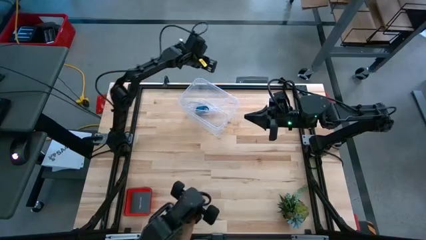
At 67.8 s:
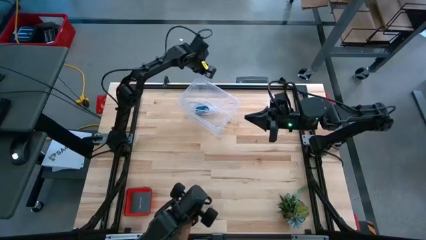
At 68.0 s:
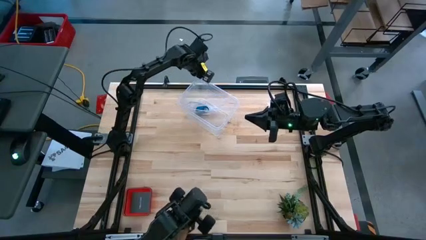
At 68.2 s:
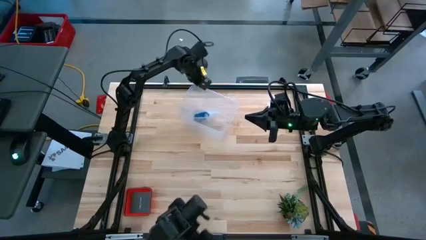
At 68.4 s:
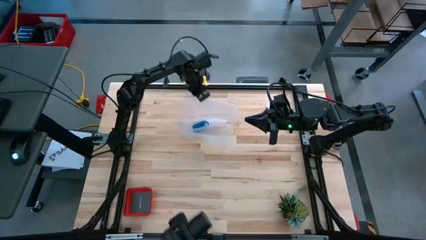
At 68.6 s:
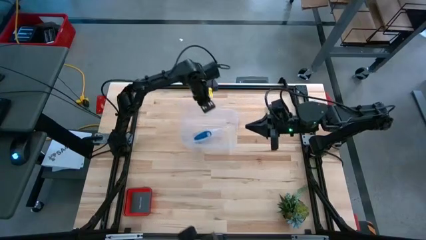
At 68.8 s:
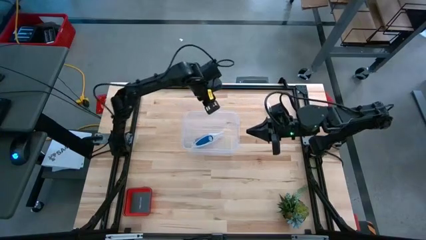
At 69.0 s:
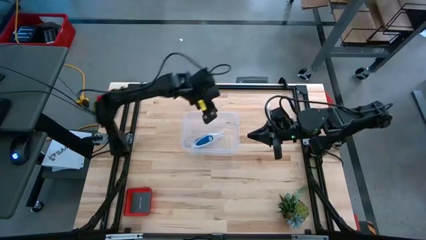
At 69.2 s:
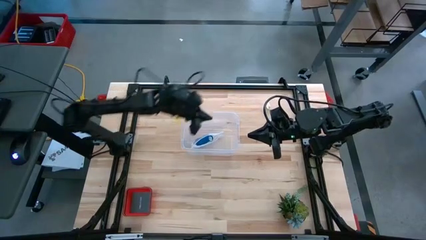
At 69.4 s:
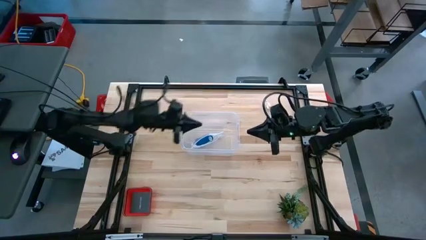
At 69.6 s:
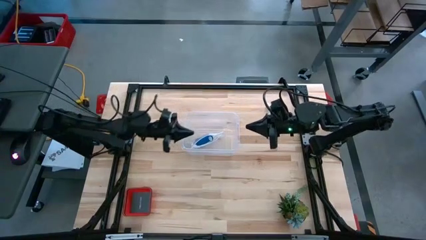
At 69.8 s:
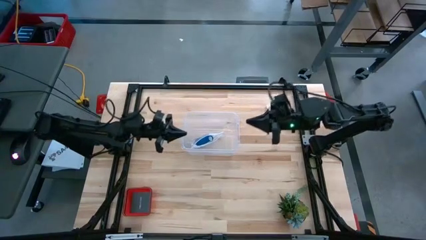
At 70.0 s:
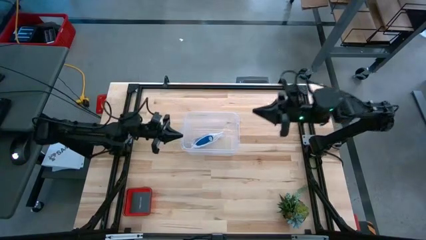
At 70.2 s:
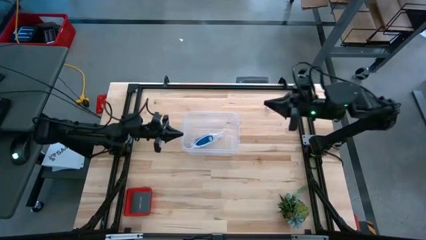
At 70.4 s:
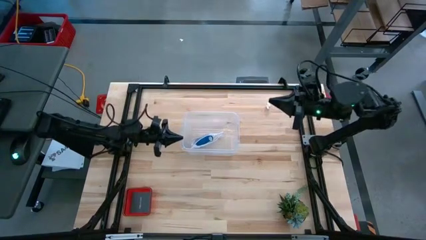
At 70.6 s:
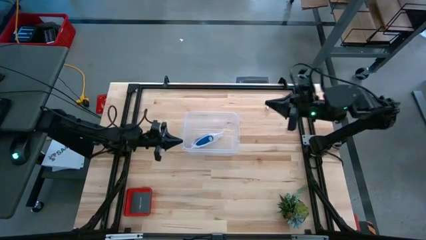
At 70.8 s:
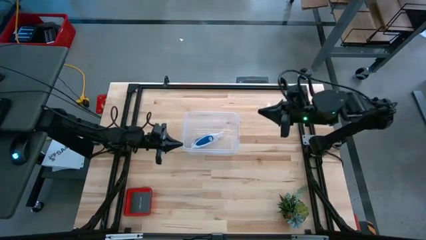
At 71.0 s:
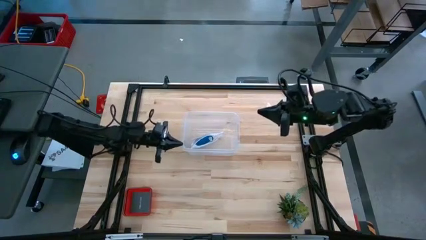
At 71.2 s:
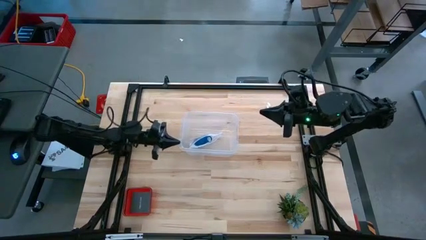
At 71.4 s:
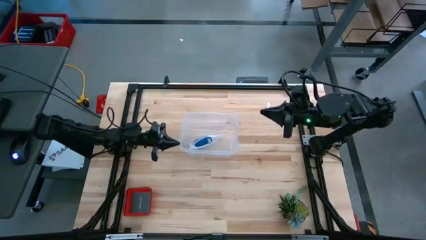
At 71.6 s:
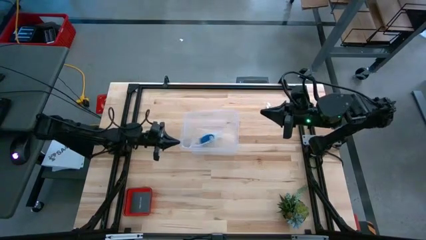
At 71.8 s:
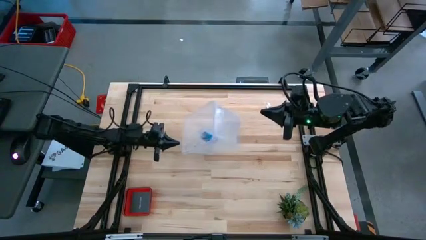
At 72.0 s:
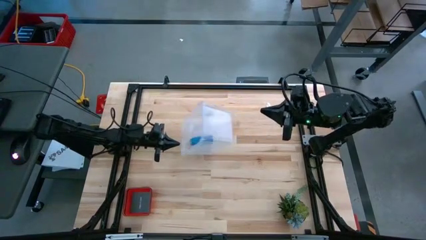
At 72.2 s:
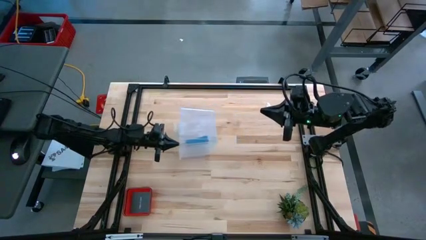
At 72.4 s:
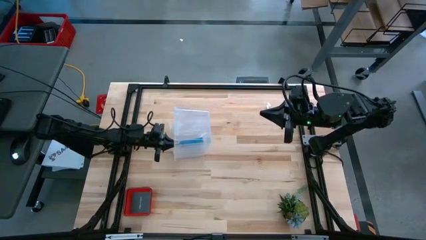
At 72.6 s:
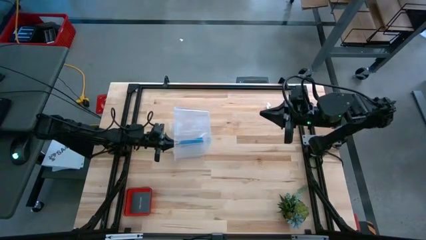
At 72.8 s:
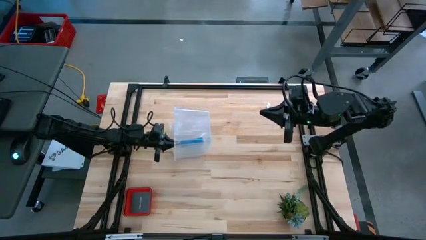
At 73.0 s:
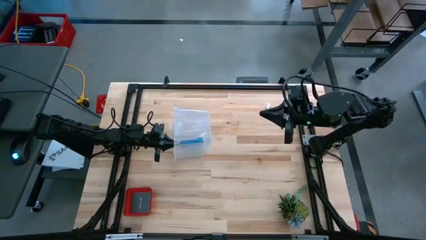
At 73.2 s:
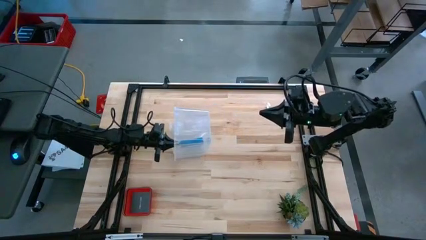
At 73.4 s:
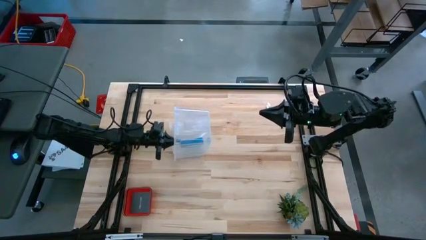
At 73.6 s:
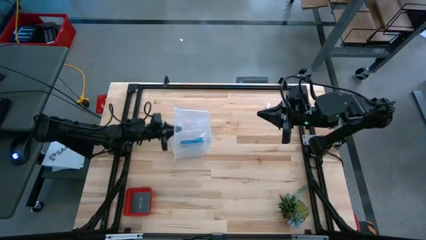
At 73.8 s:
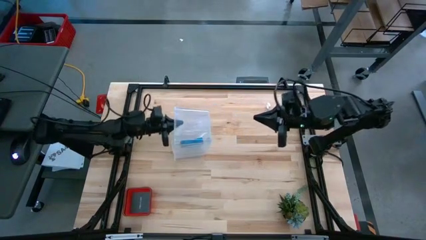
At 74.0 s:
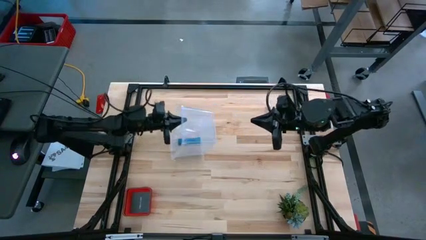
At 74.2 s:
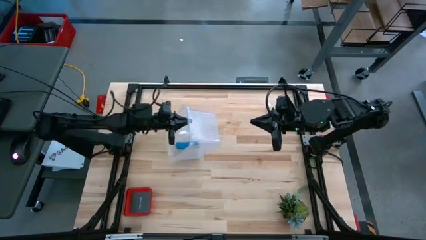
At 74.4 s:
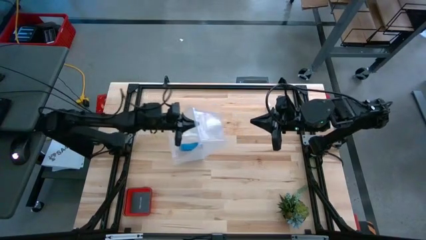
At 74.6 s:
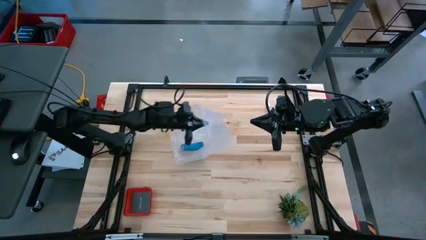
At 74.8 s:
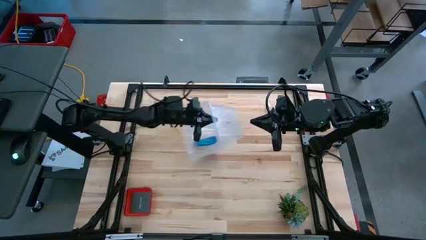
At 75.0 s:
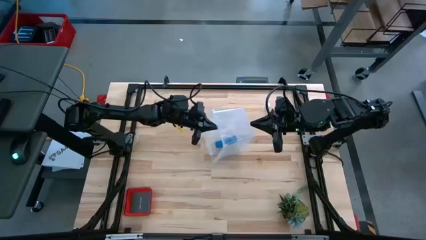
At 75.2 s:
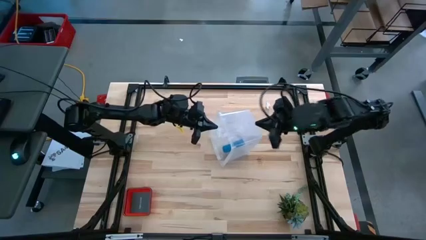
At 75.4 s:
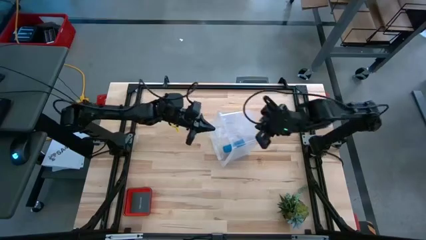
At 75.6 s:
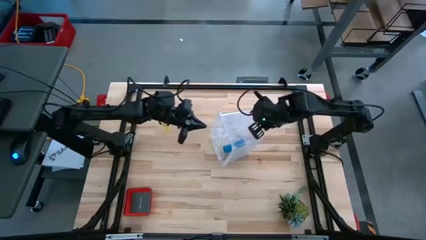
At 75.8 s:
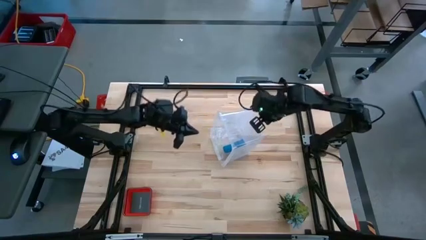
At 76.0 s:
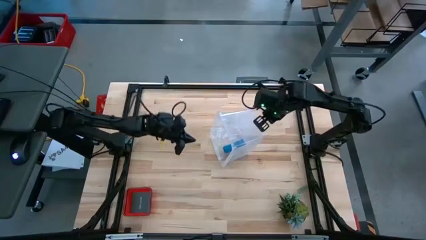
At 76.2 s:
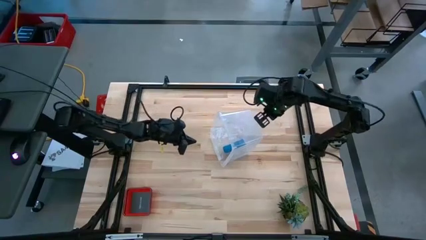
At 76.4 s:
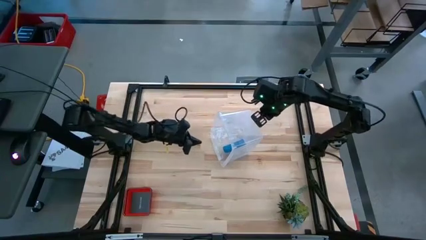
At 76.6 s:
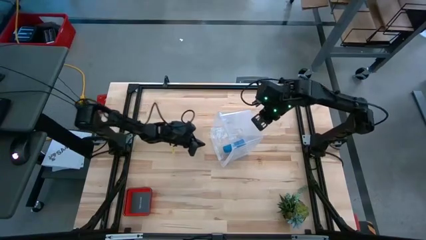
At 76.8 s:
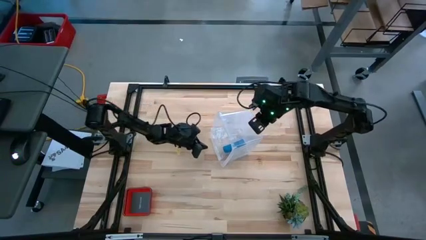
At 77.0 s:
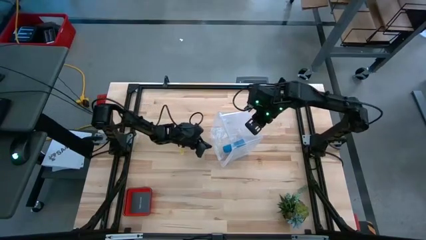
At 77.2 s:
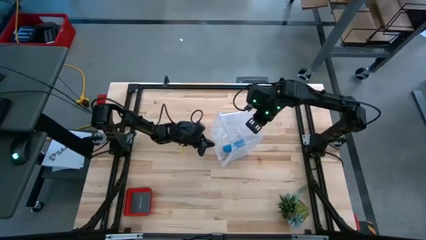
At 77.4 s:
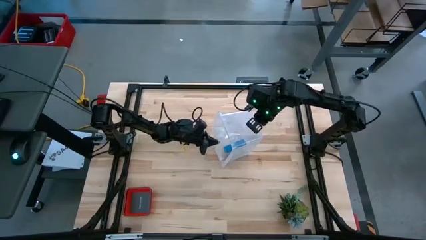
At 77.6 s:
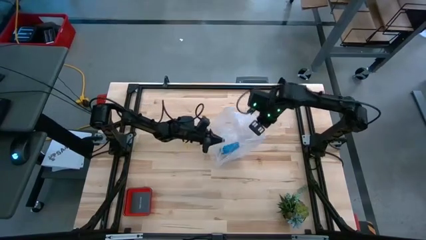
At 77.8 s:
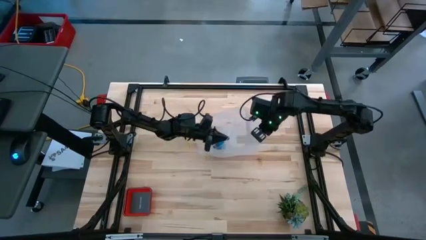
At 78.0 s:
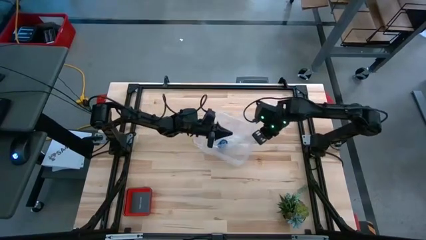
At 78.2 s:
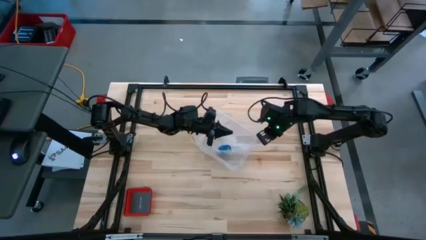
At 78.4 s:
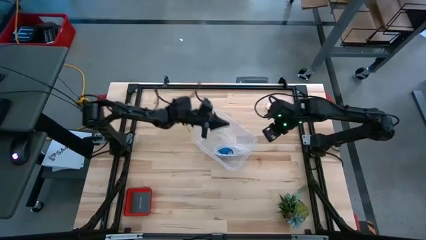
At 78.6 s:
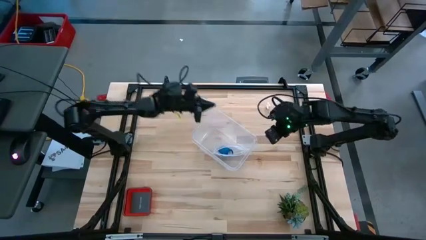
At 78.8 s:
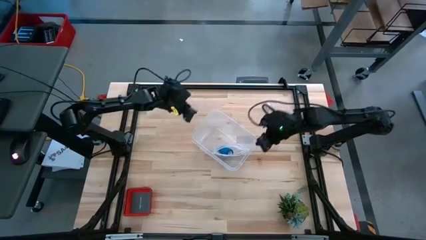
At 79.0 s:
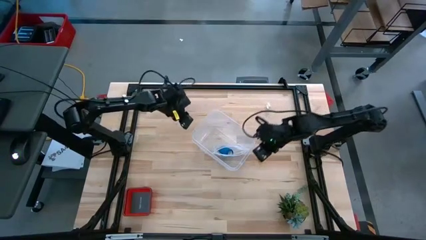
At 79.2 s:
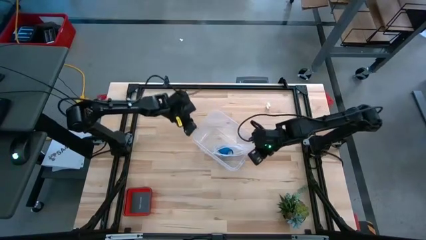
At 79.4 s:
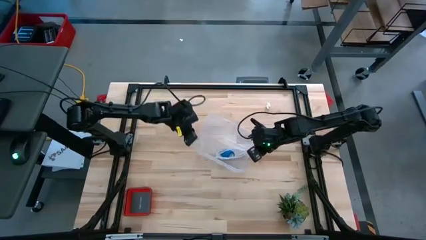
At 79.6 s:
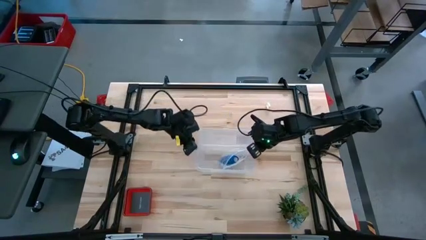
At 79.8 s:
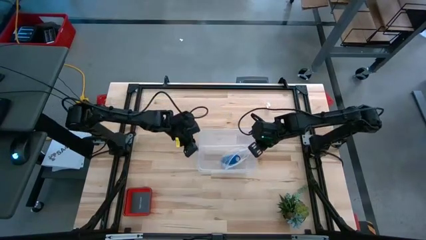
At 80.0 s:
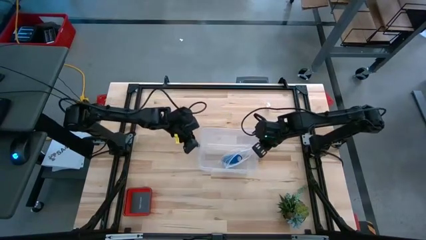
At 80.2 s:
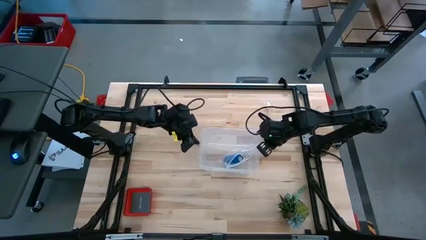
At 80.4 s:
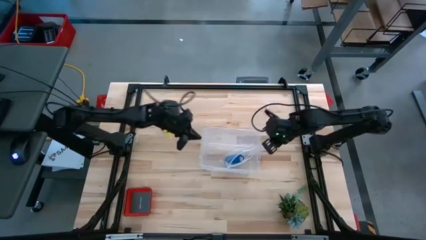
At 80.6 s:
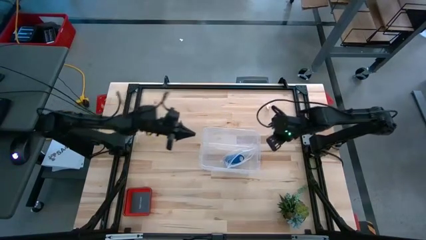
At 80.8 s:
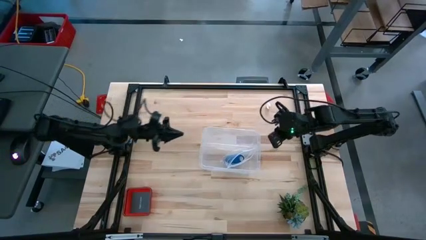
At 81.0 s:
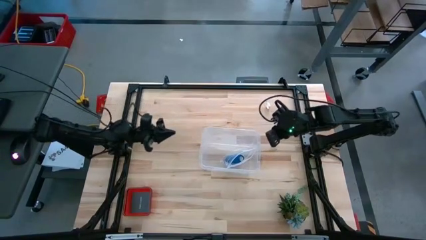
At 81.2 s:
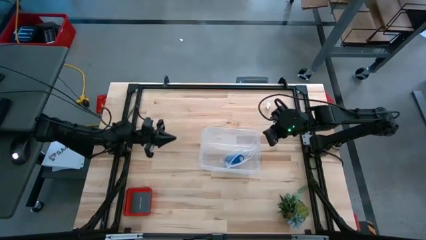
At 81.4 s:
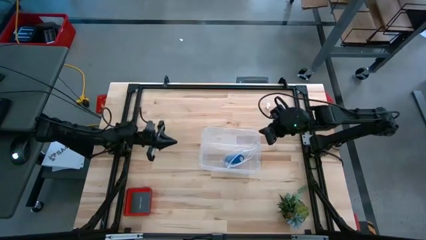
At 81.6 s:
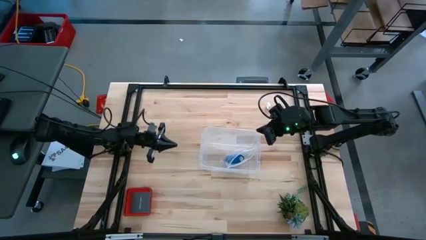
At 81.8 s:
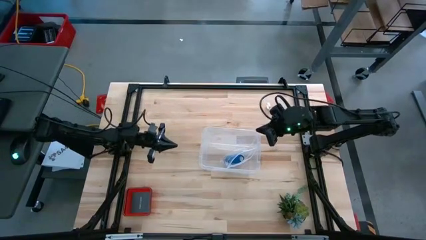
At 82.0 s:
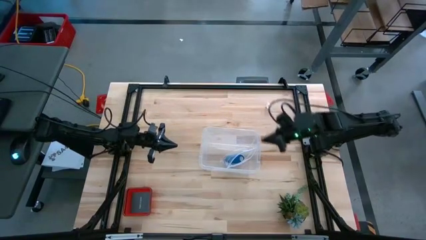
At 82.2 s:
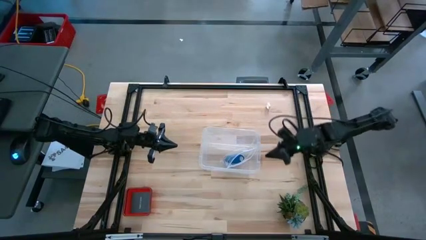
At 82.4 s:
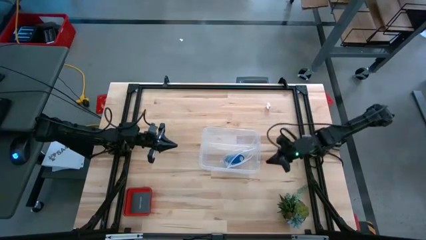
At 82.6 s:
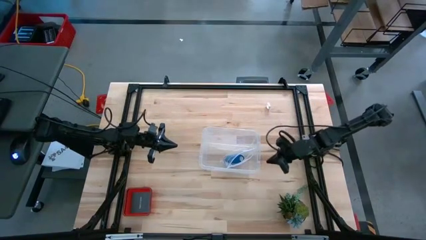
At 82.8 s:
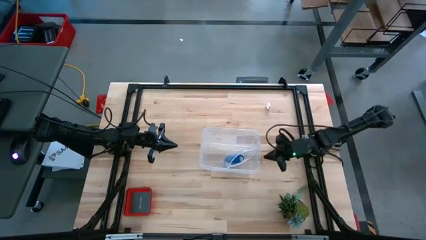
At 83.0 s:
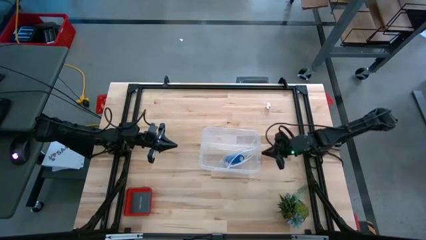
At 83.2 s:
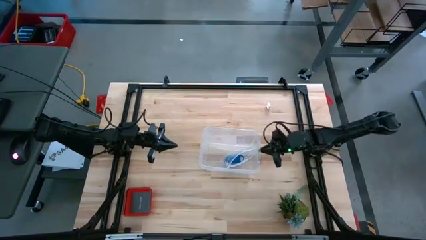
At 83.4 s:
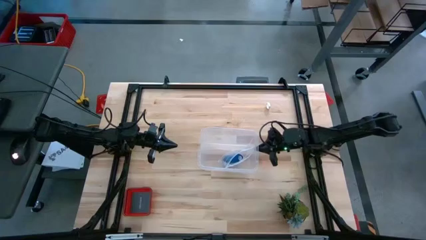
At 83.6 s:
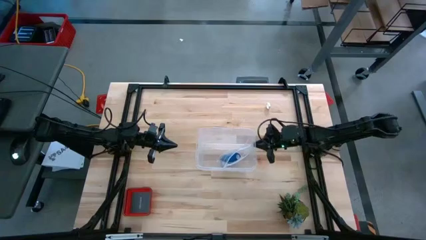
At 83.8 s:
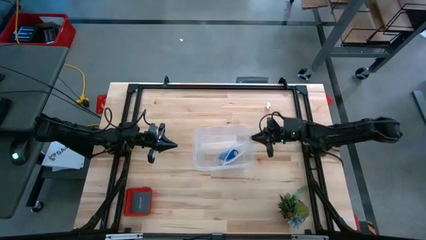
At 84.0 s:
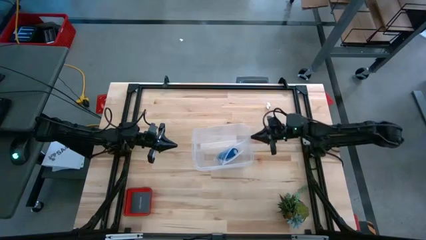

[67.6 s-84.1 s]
Task: Roll bandage
Move the transparent container to the center
